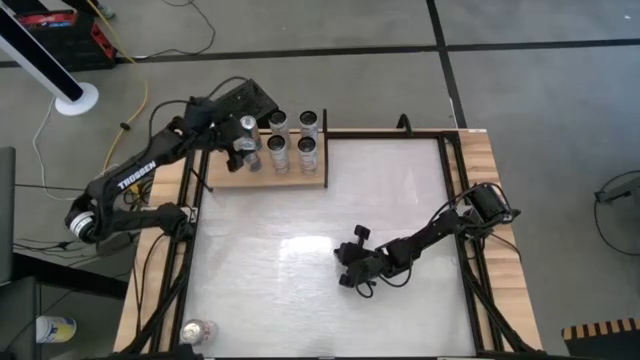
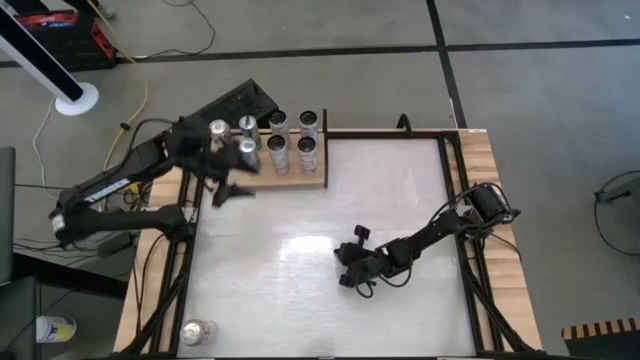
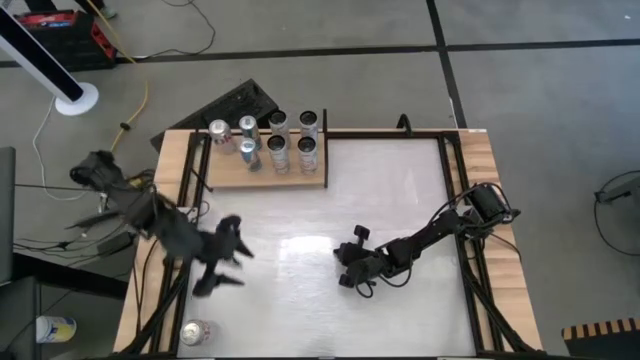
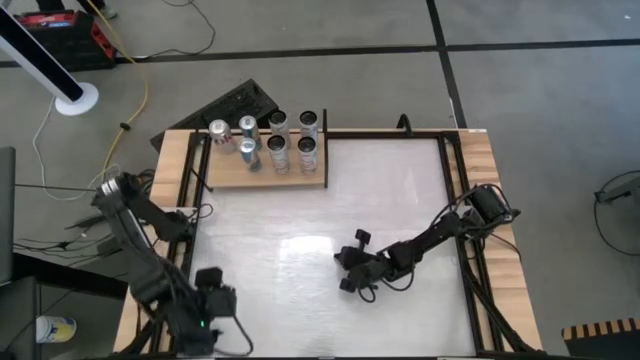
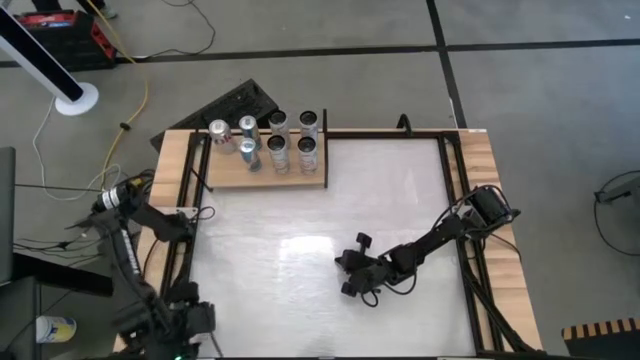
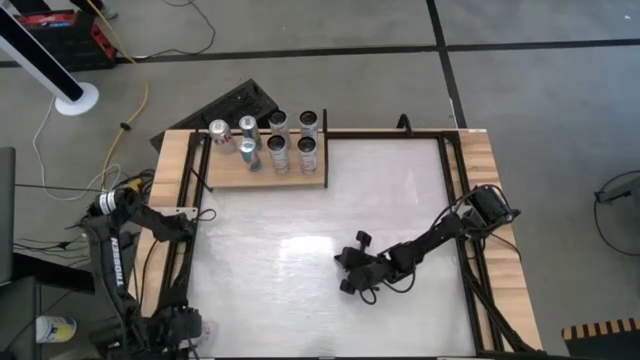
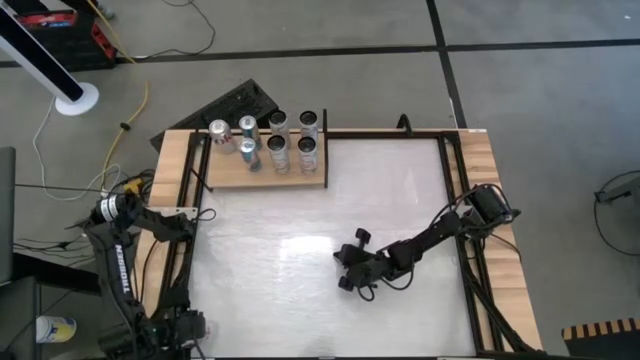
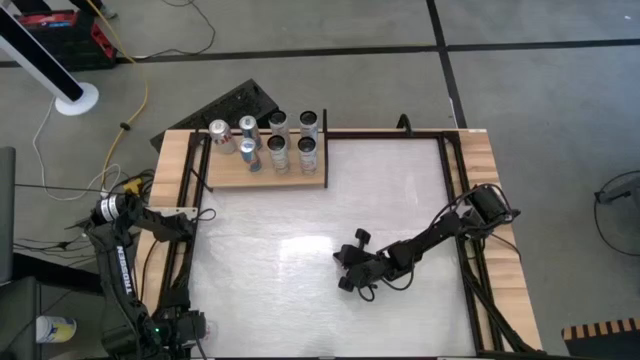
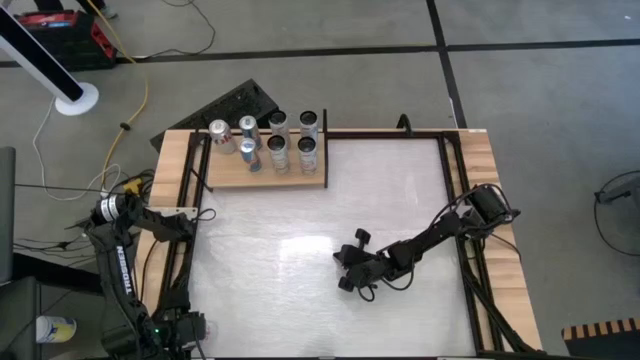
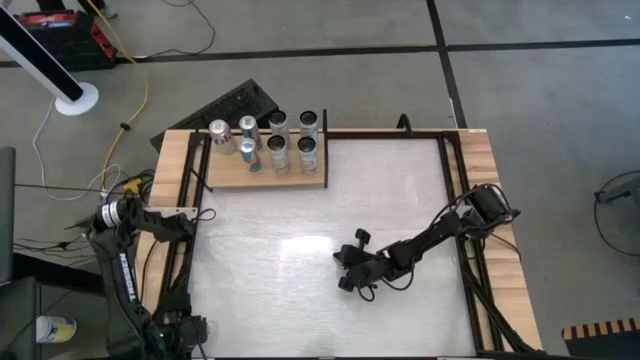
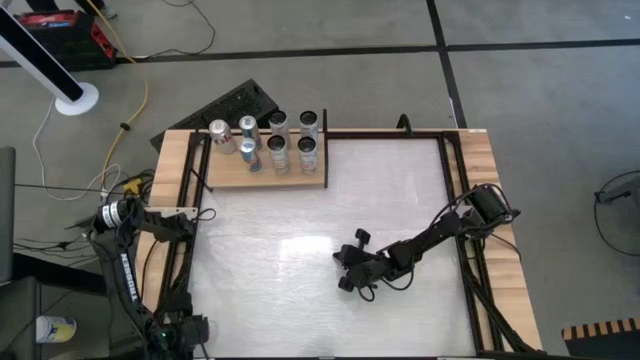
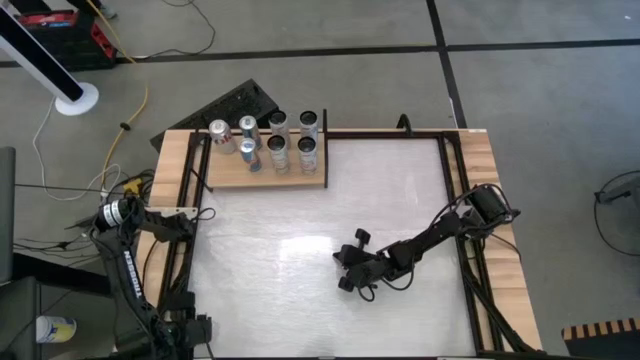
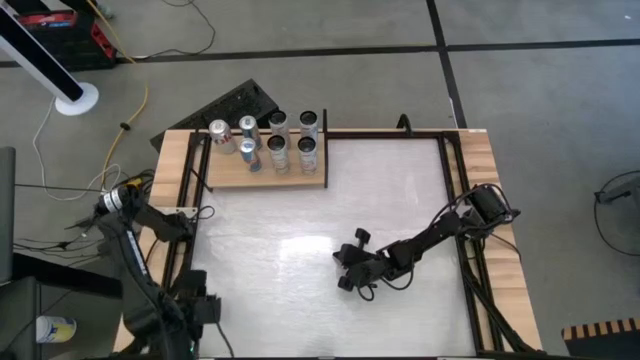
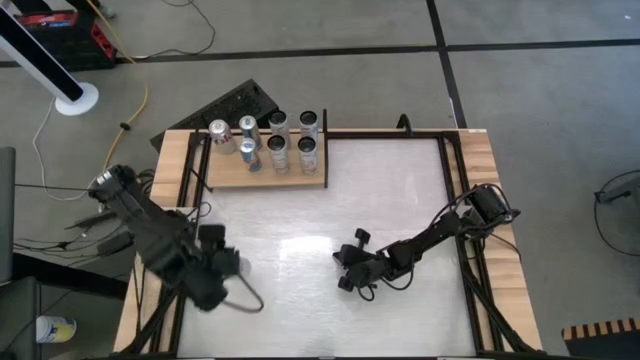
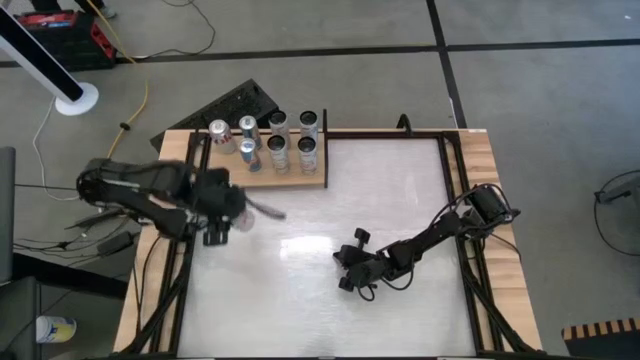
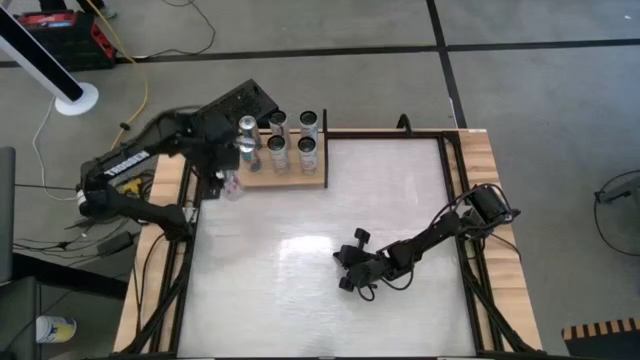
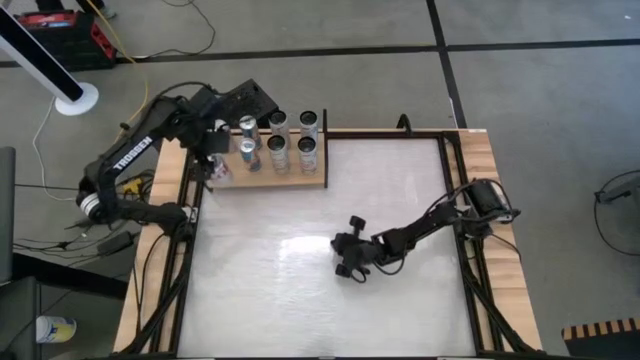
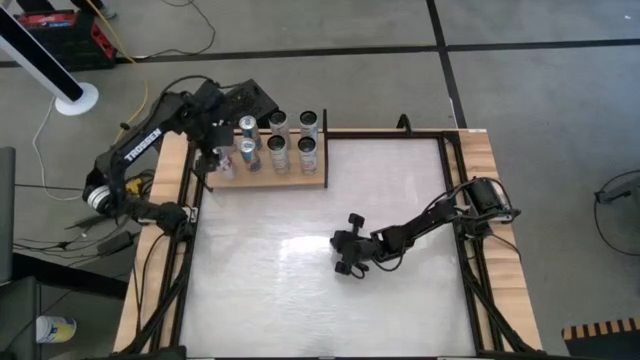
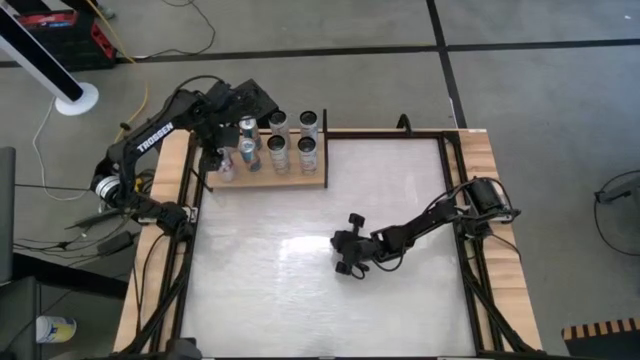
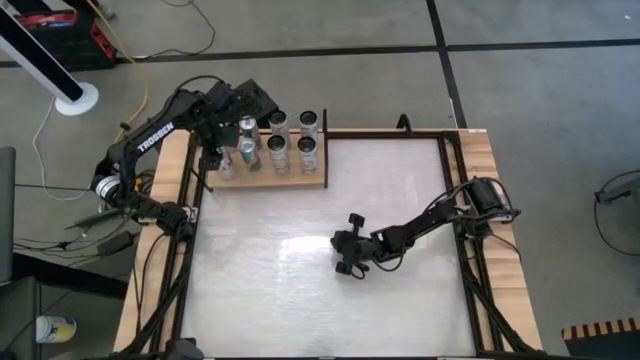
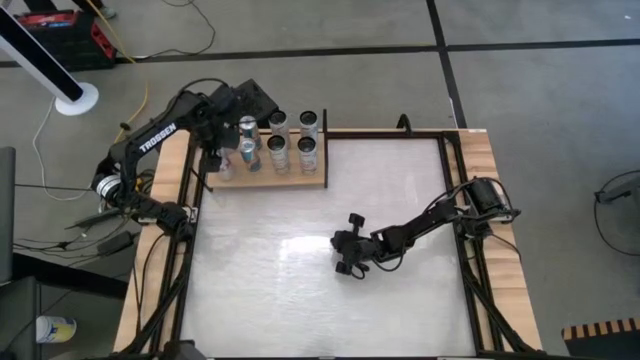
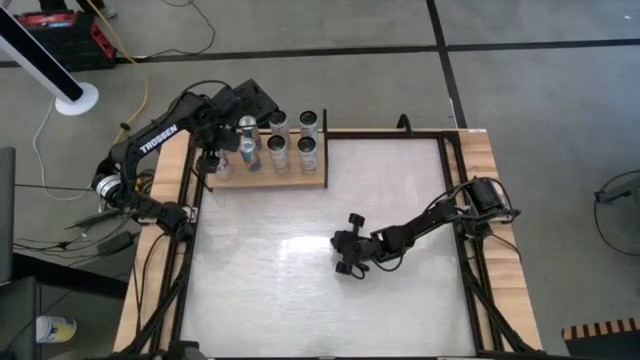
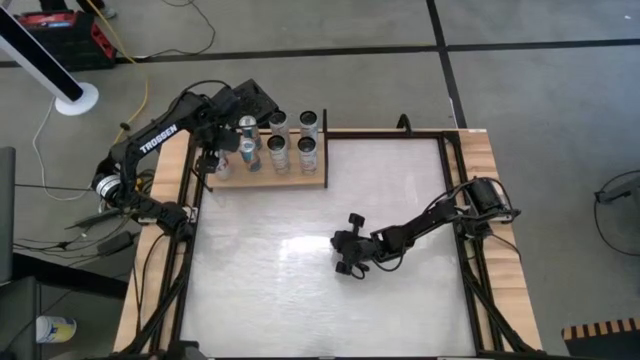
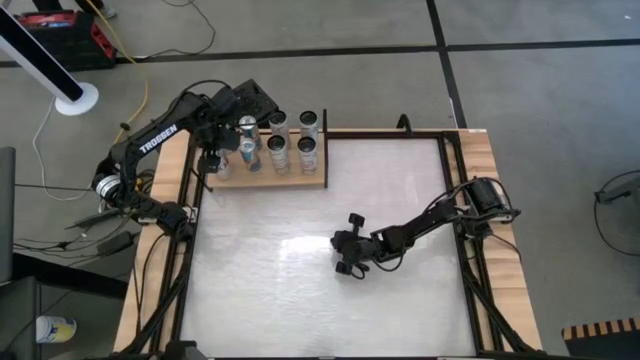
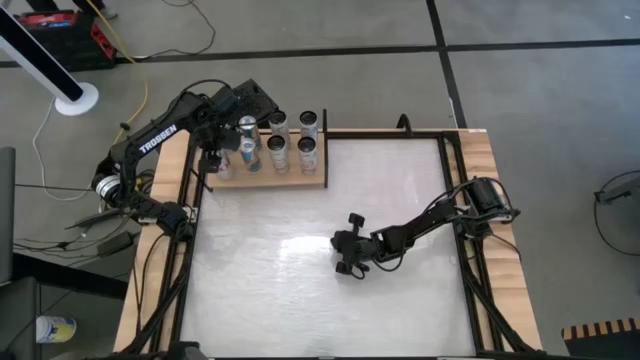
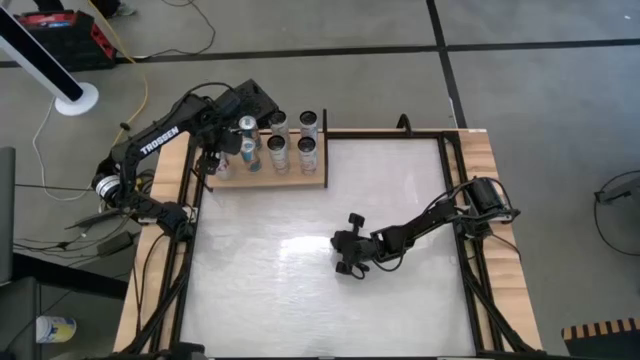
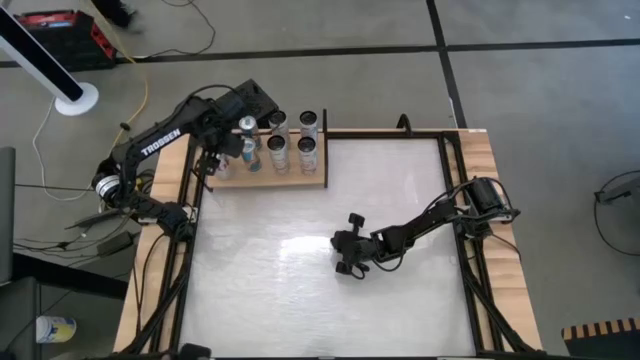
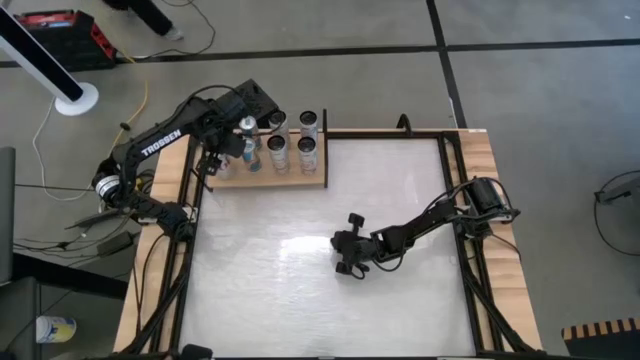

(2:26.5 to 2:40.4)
Task: Place canned beverage on shelf
Put the coke soda can aligned with the other coke soda can on the shelf

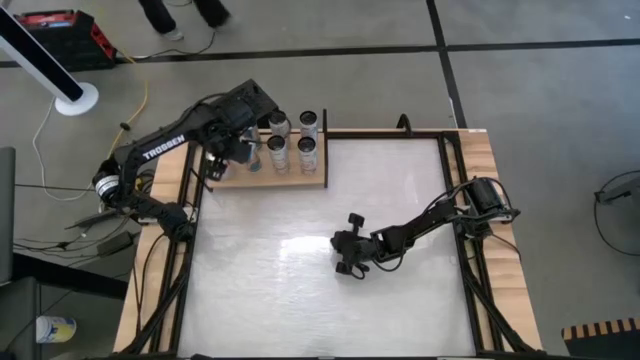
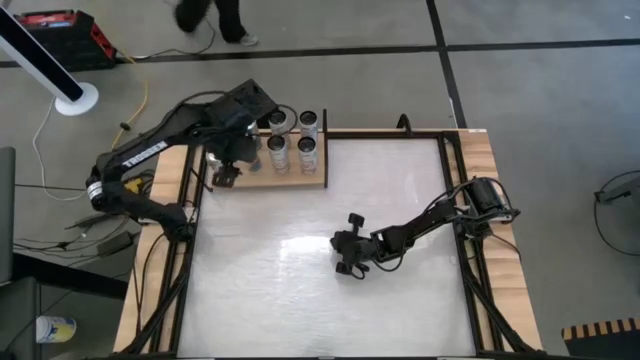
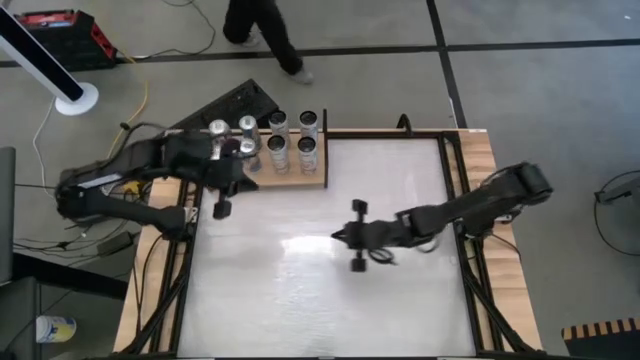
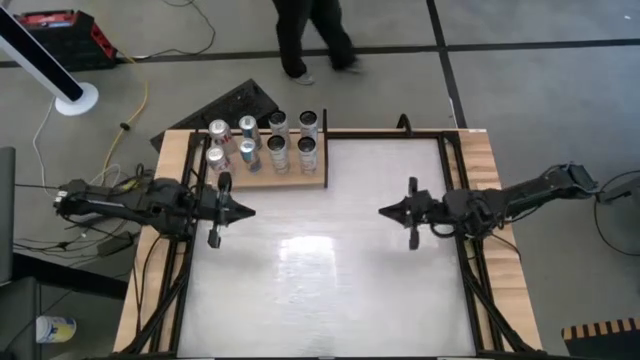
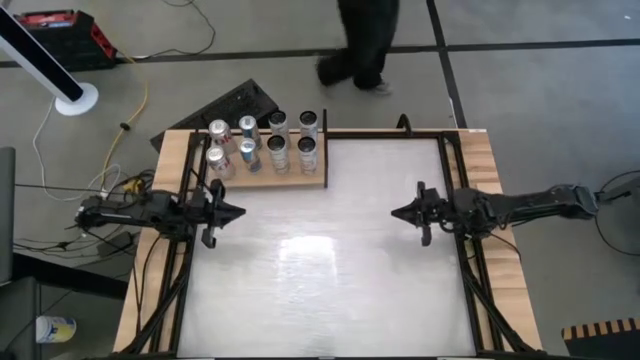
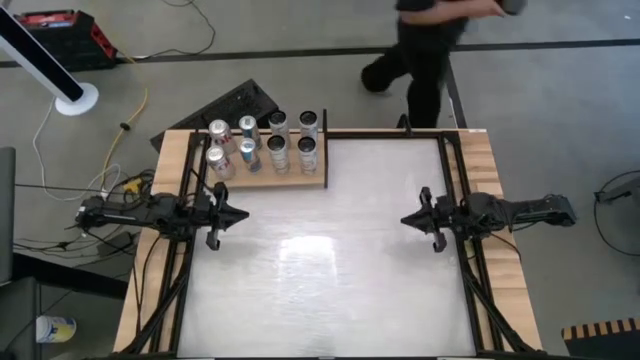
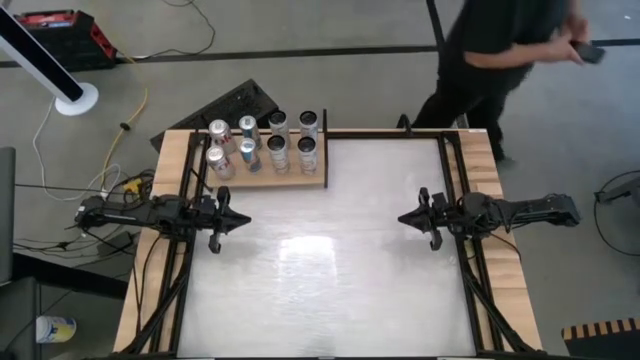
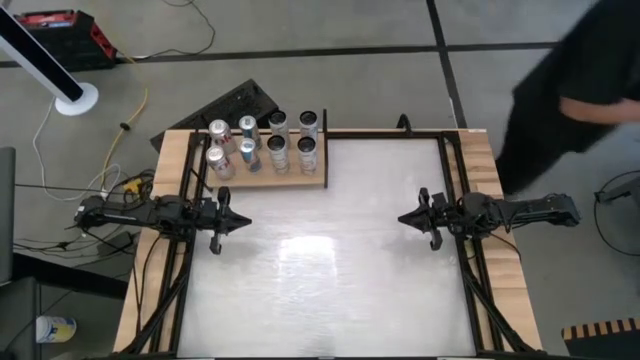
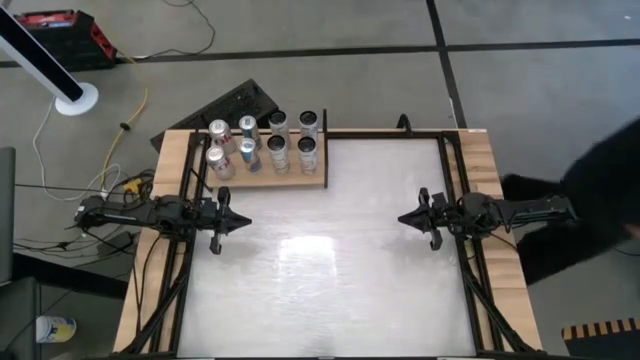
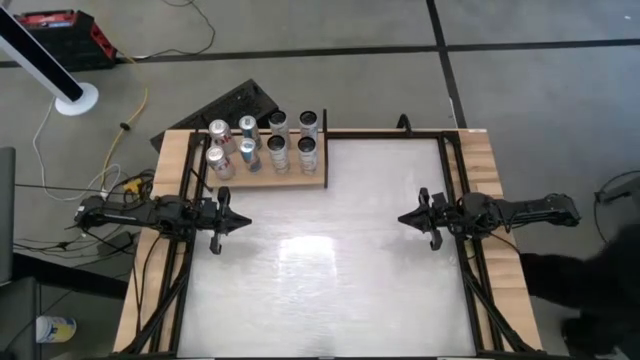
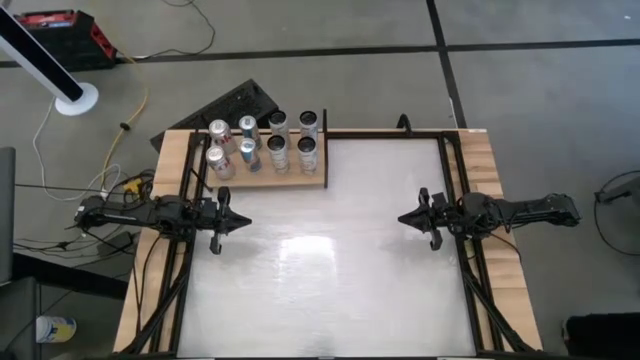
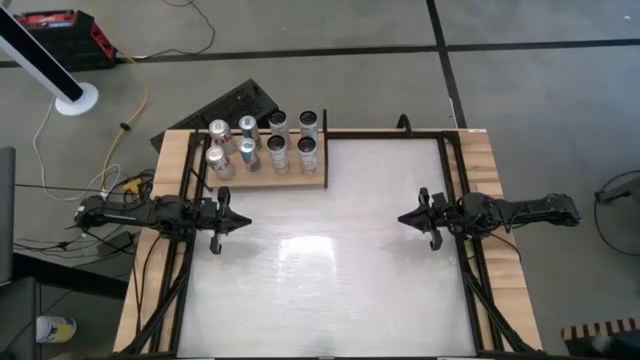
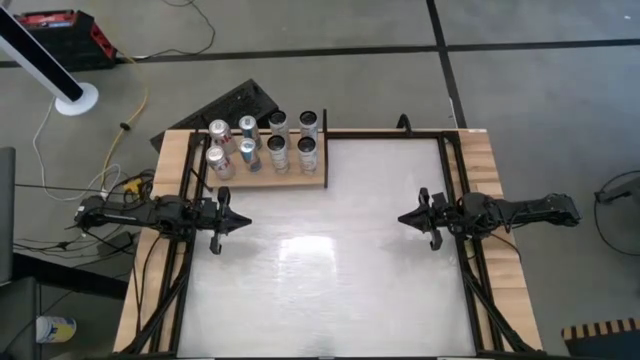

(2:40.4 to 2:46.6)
Return to Home Position

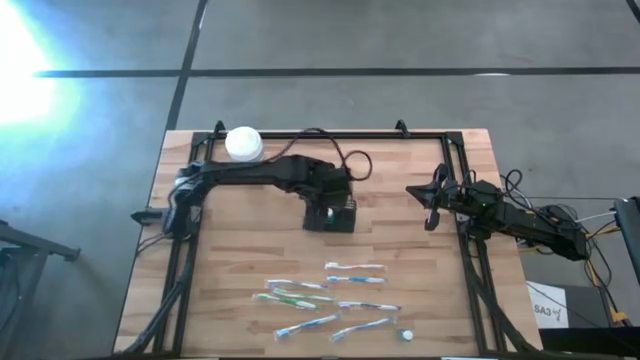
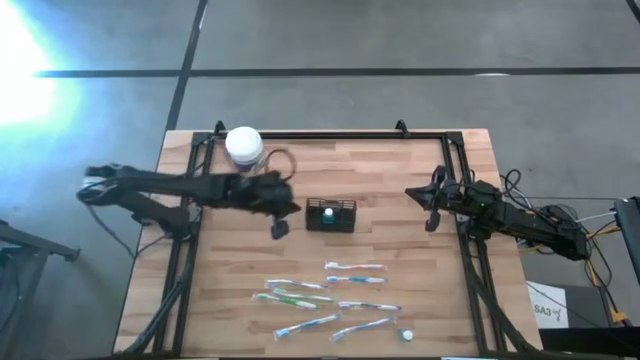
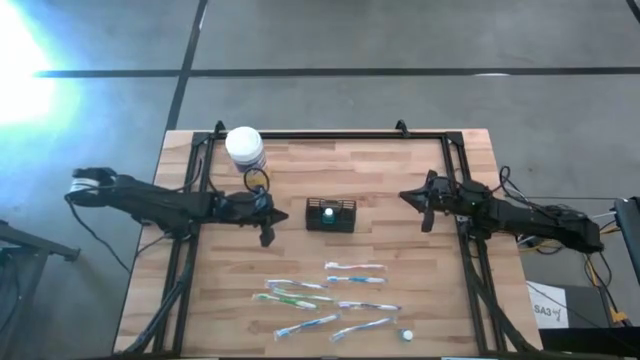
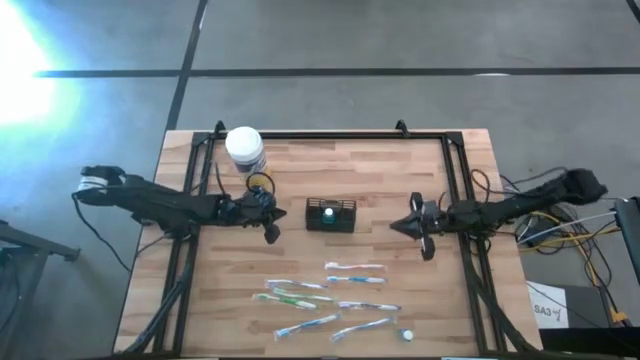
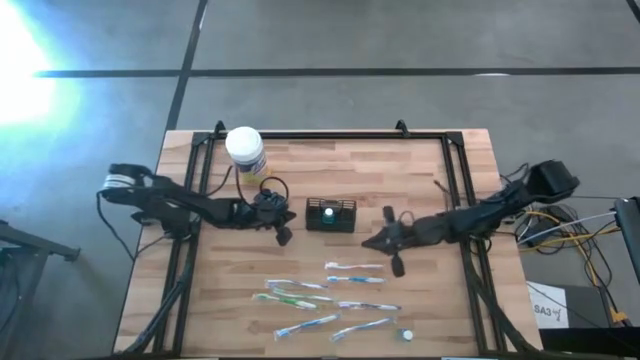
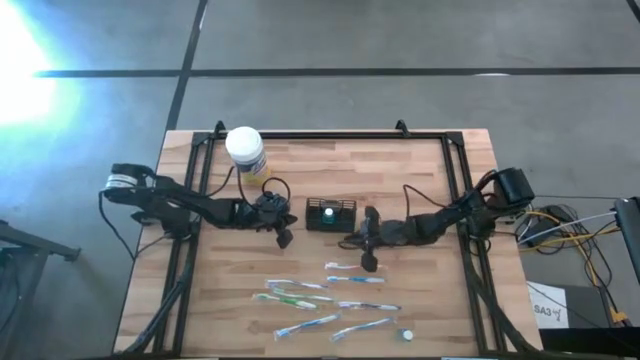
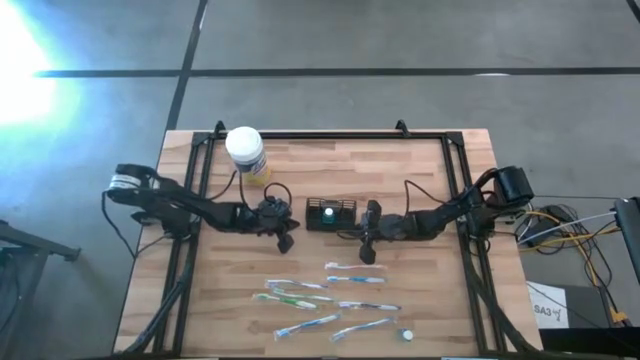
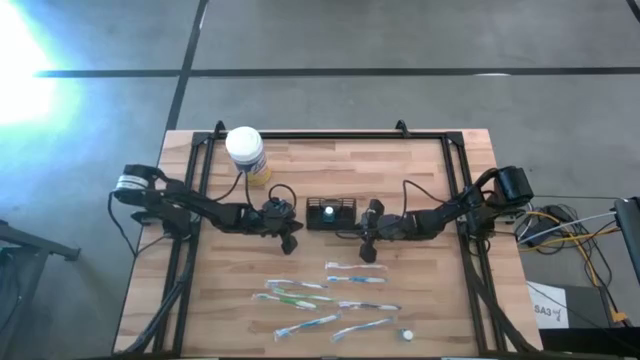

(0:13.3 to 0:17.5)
Task: Pick & Place toothbrushing station
Adjust the black wire organizer
